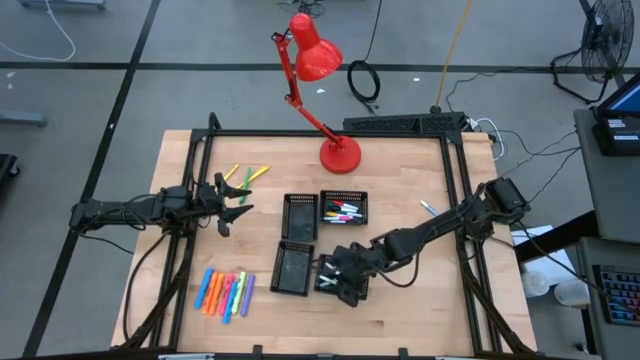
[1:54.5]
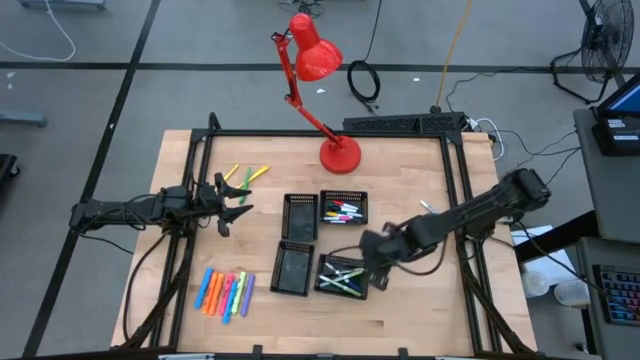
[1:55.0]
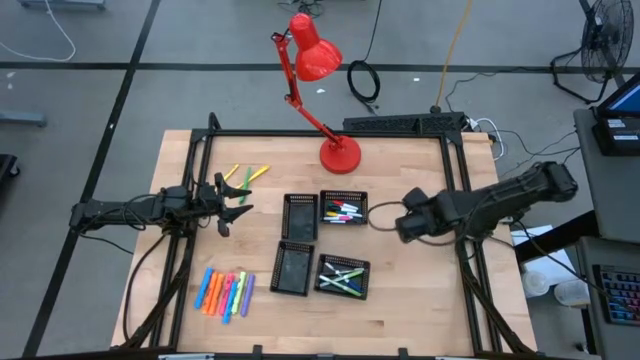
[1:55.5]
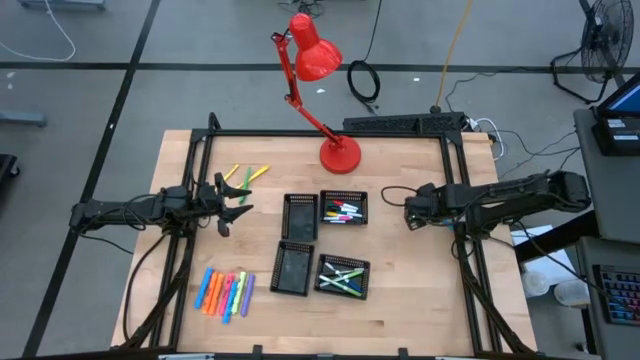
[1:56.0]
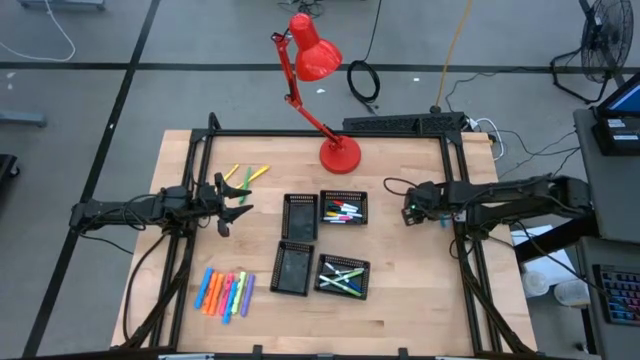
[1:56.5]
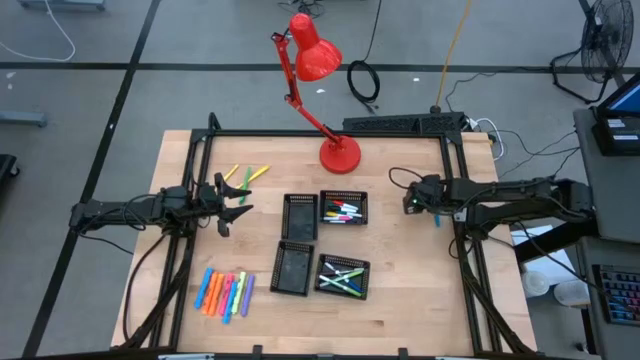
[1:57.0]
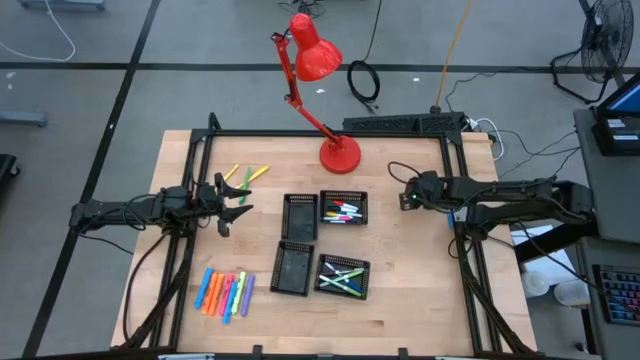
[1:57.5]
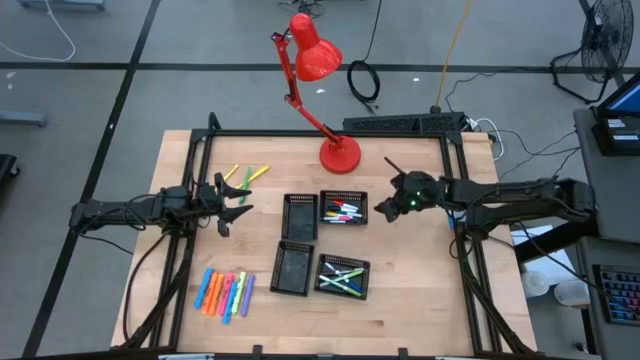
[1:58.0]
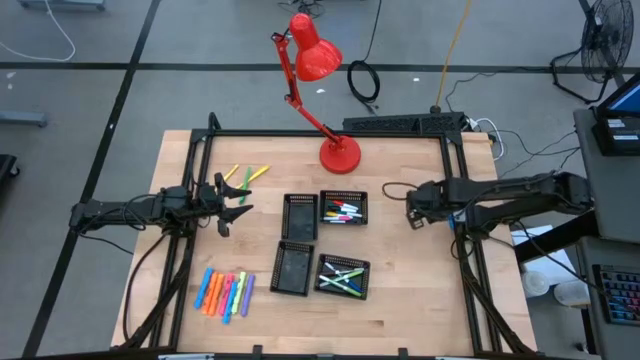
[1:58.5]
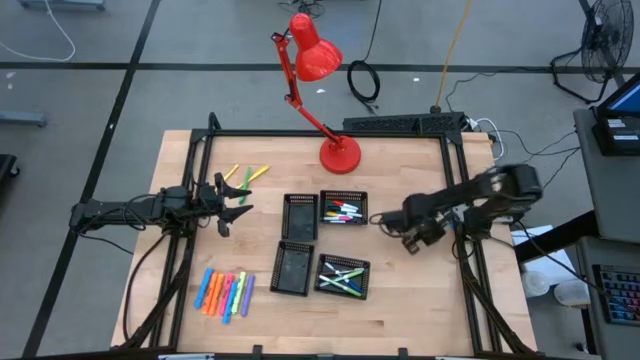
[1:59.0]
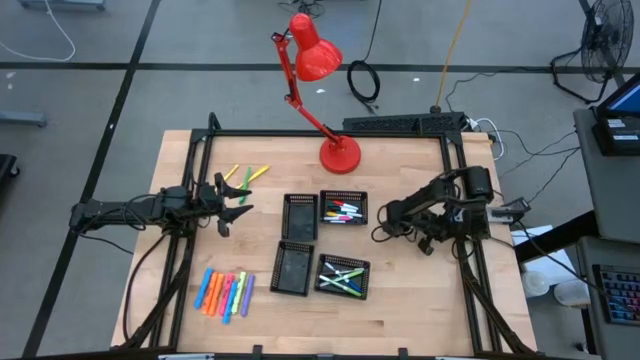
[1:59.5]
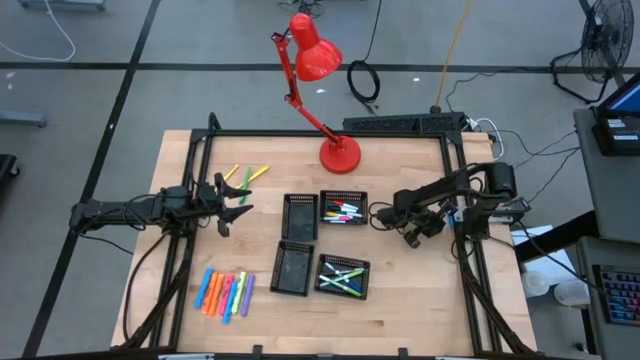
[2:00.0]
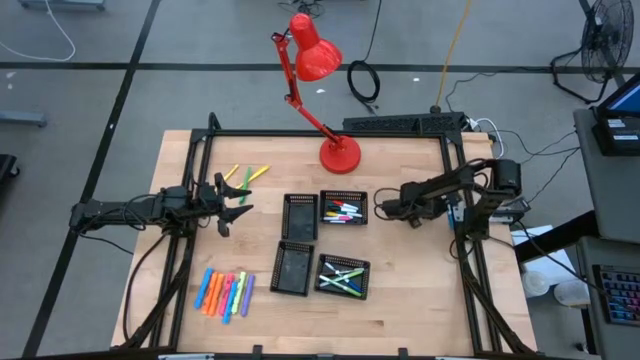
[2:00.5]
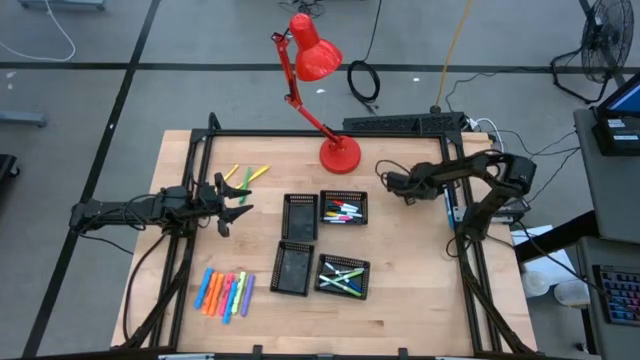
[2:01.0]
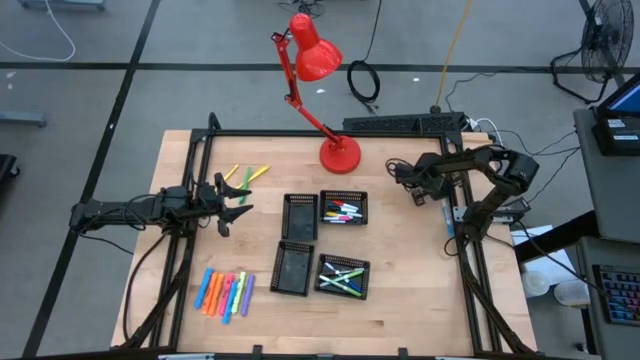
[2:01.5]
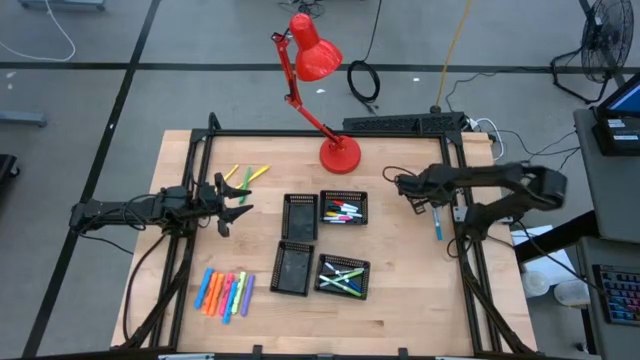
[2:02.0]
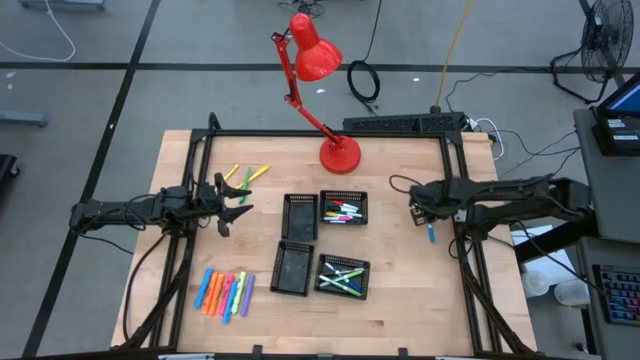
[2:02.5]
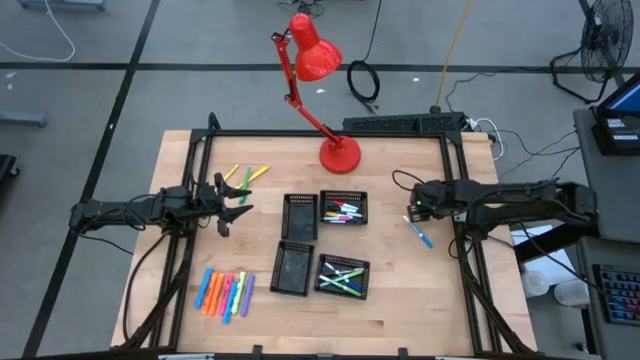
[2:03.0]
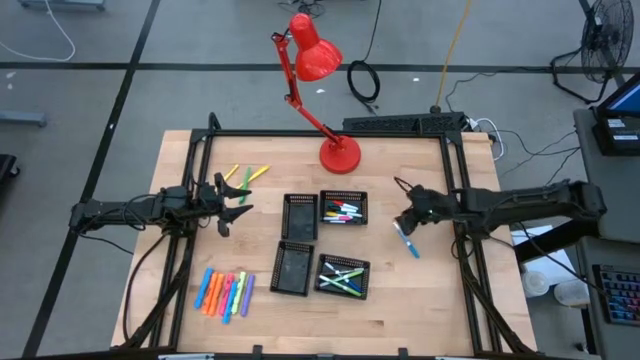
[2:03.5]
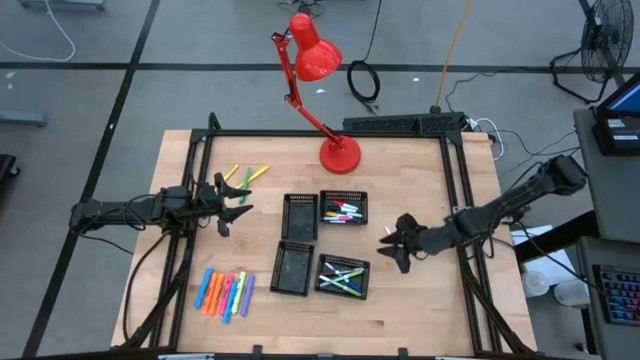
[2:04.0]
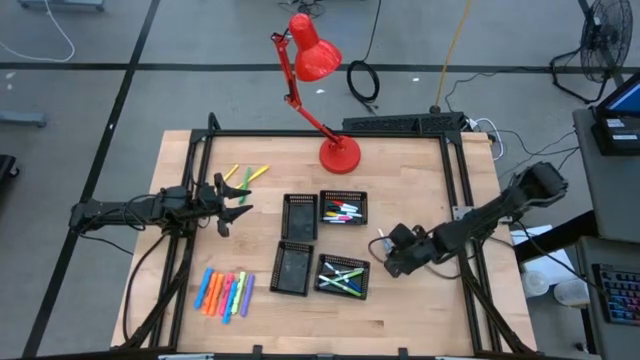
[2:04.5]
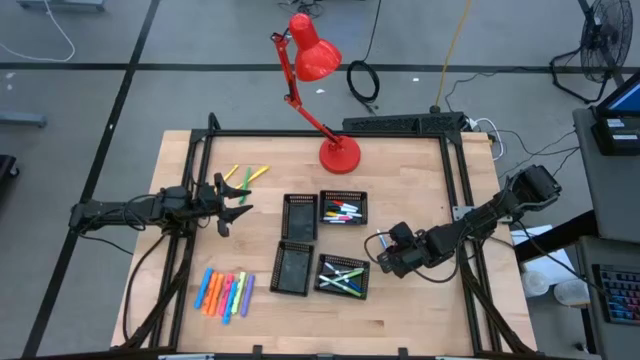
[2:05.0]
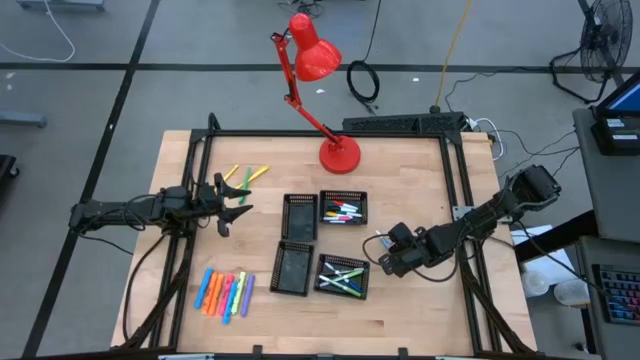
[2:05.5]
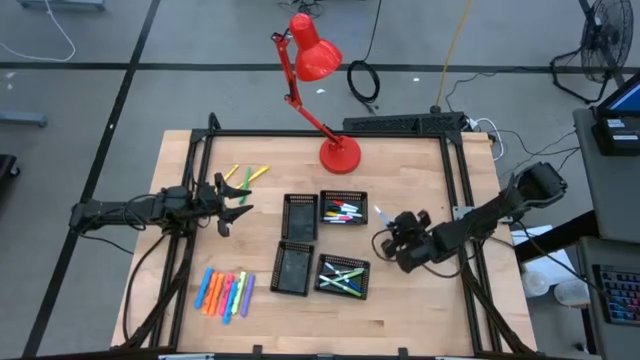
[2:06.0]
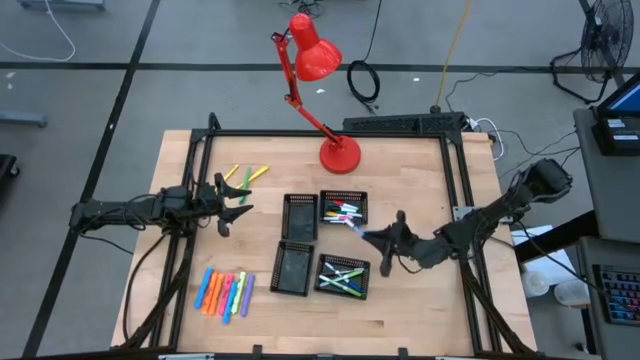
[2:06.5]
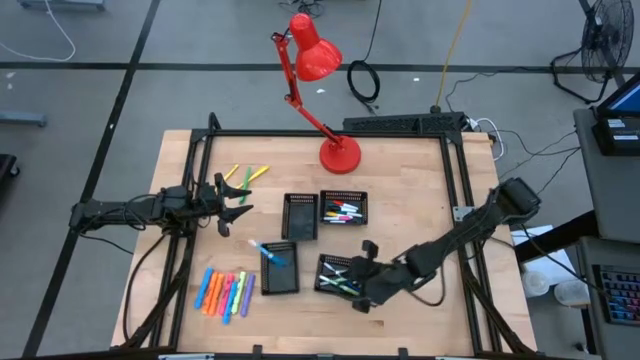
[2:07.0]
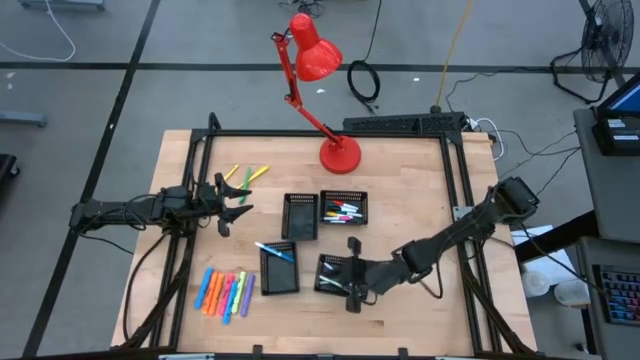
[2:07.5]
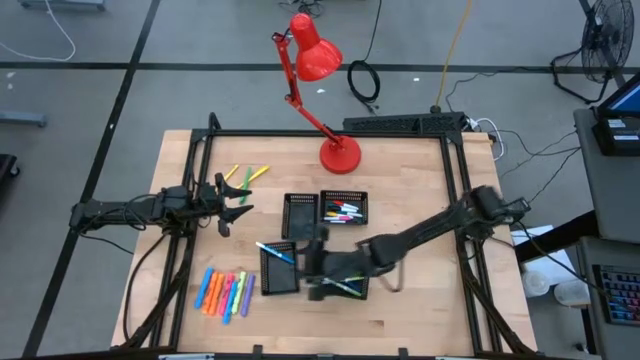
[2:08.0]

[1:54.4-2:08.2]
Task: Pick & Place Markers
Put the light blue marker pen into the bottom right black bin

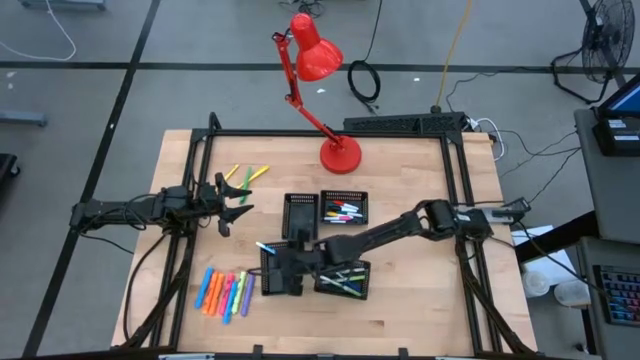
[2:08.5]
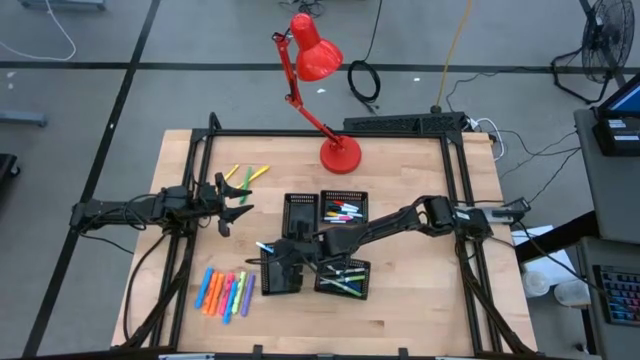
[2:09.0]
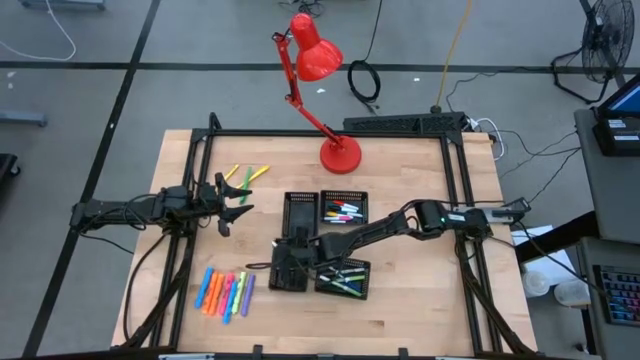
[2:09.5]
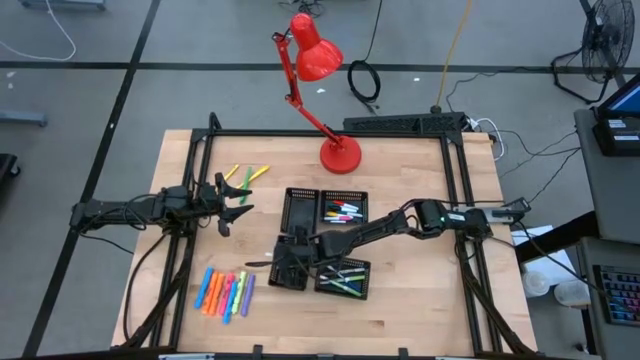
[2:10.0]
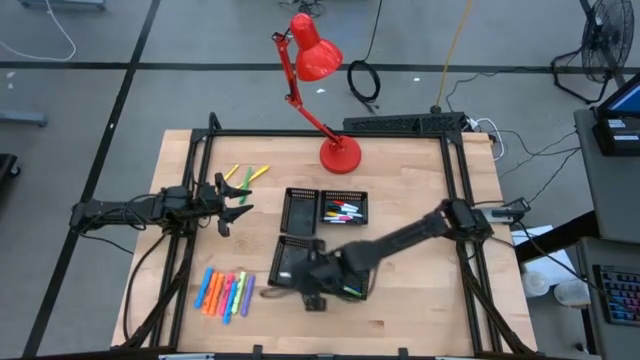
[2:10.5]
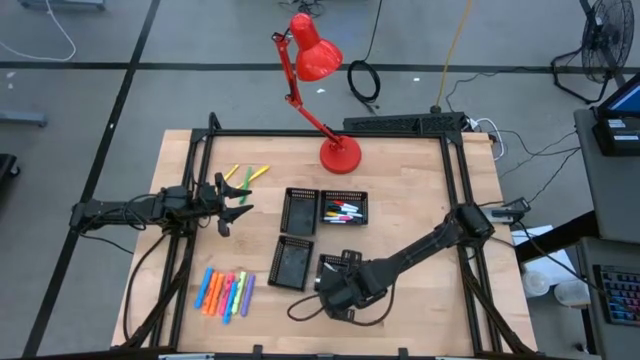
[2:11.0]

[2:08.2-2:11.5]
Put the light blue marker pen into the bottom right black bin

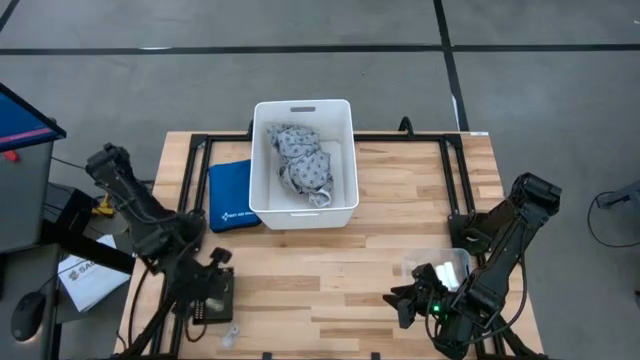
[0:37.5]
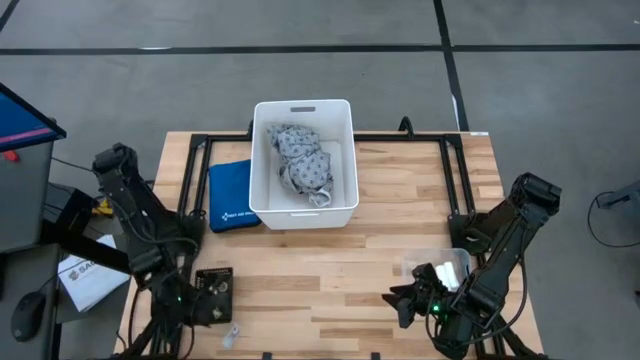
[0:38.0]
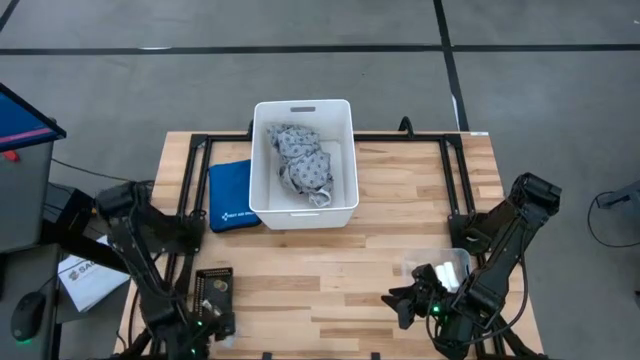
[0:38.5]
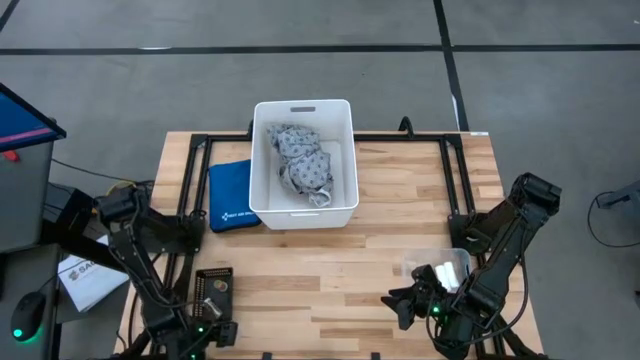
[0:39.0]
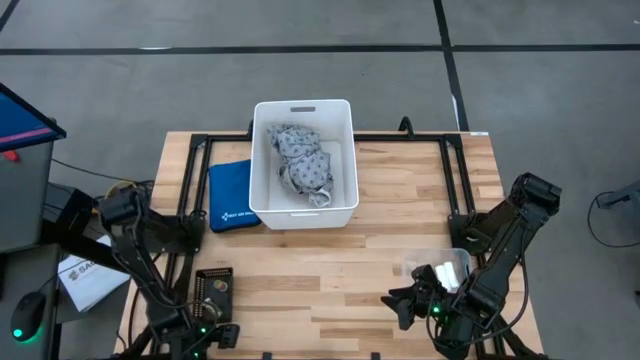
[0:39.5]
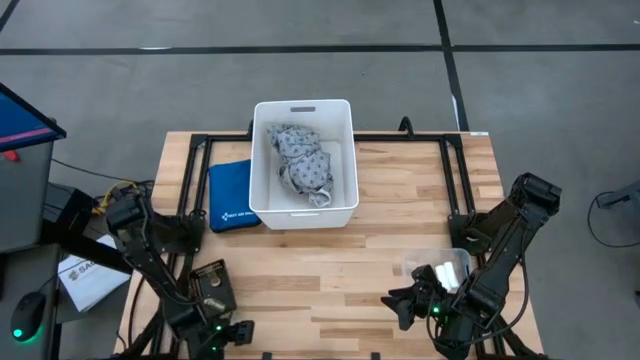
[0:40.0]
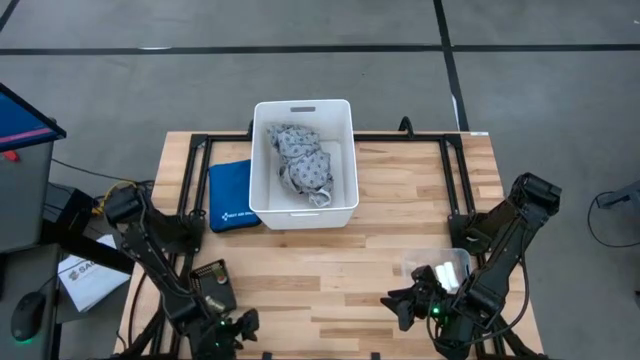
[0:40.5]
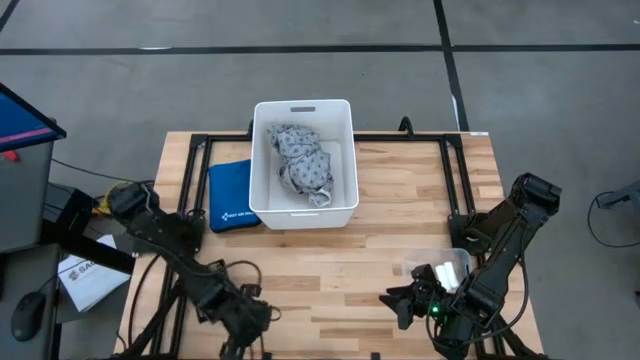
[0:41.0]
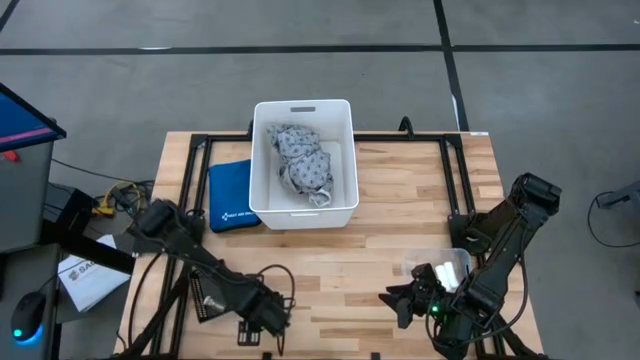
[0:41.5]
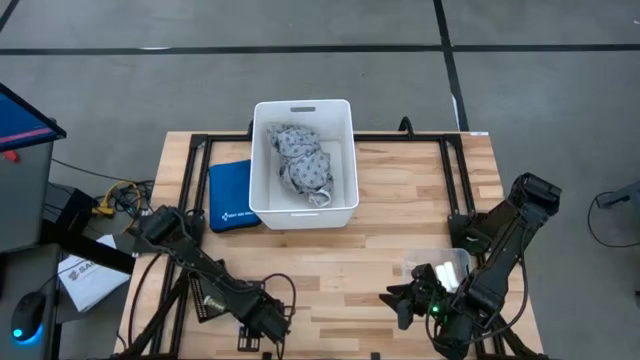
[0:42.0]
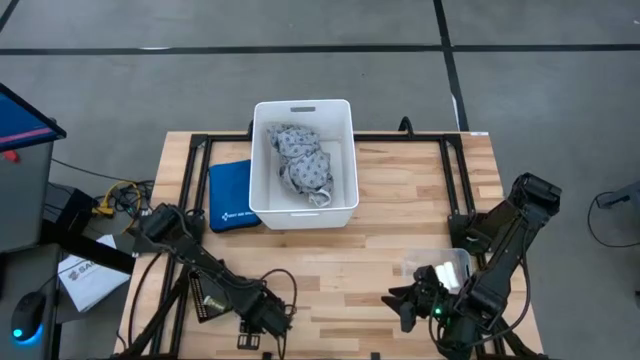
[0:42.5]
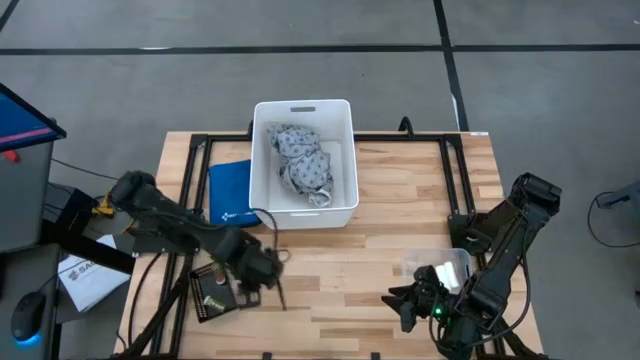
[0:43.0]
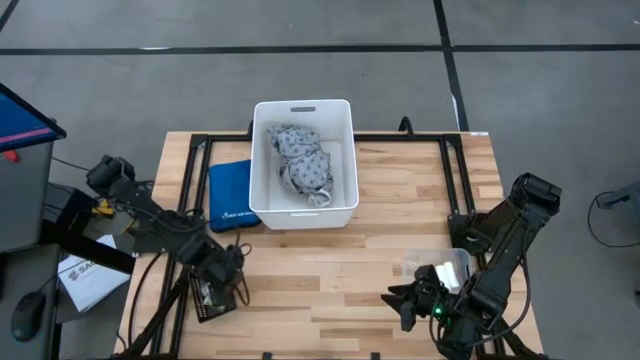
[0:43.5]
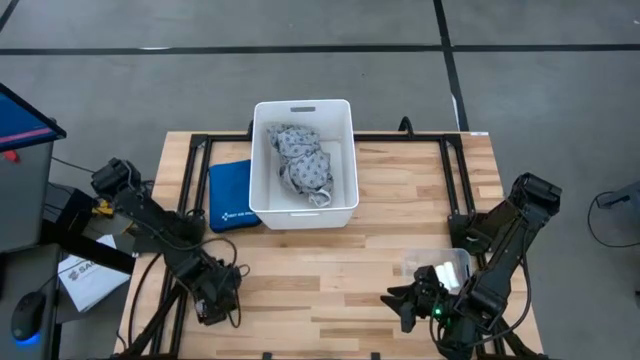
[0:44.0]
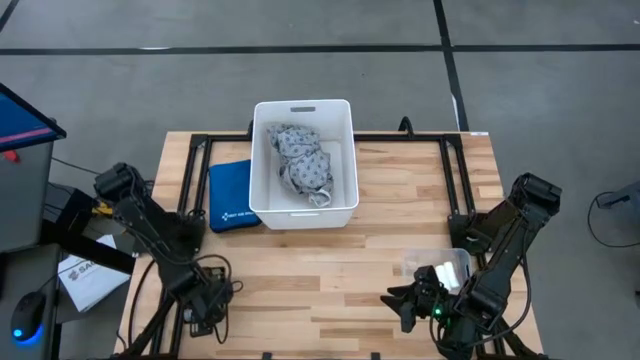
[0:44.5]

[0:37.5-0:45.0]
Task: Pick & Place Medicine items
Put the transparent pill bottle into the black bin
